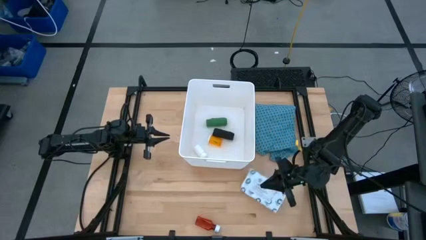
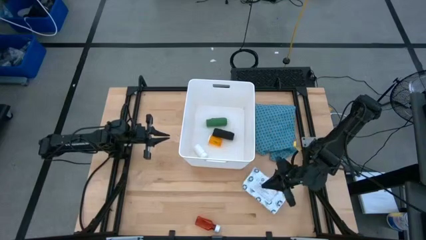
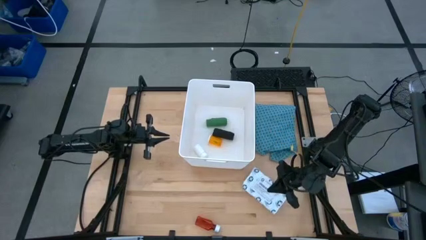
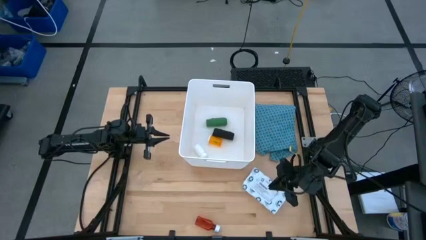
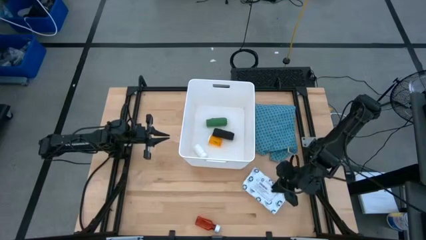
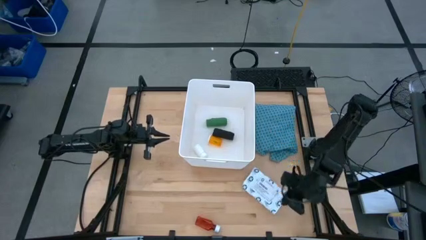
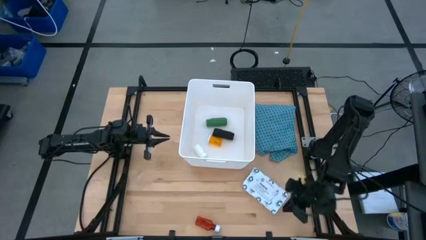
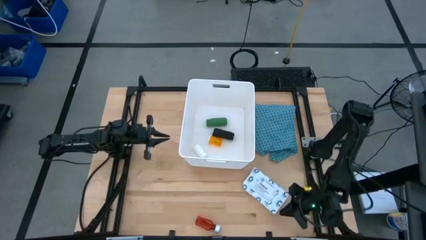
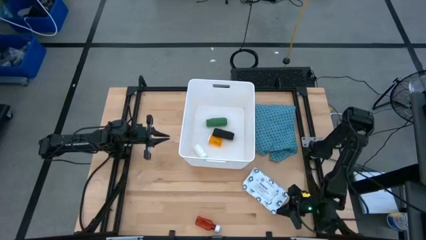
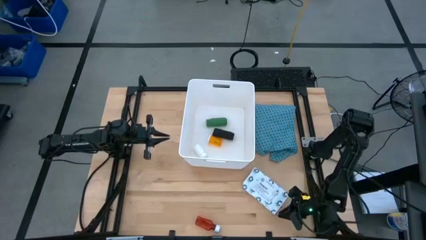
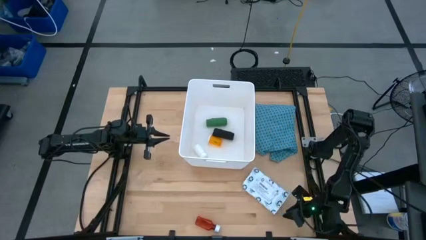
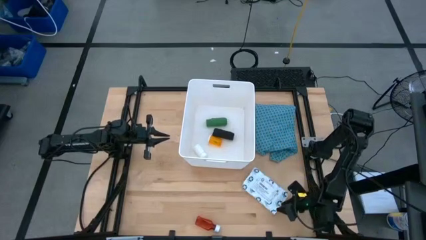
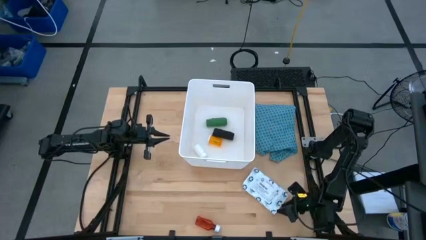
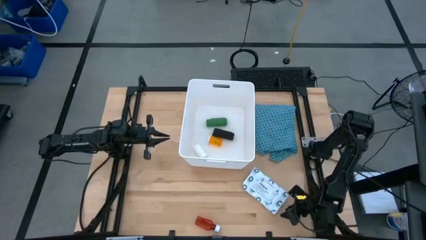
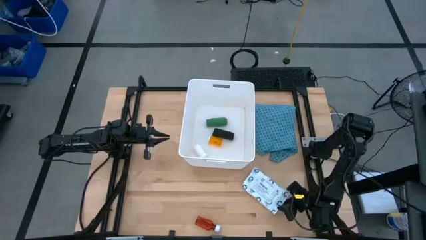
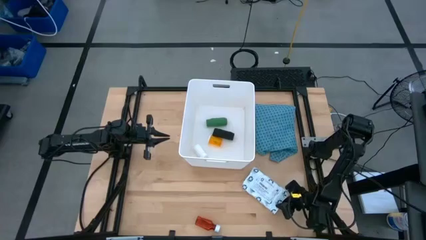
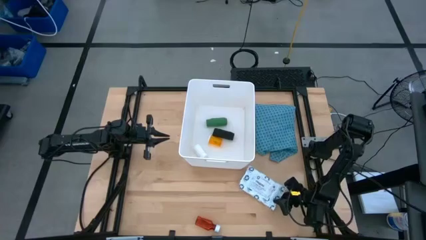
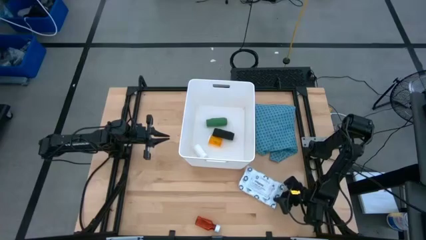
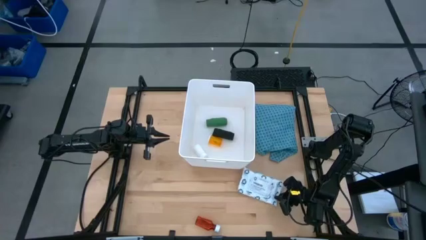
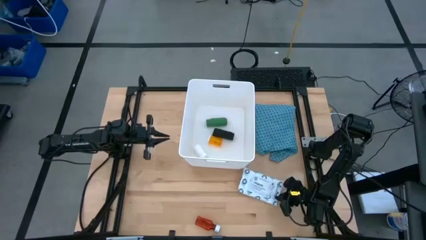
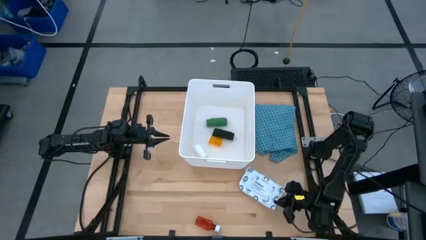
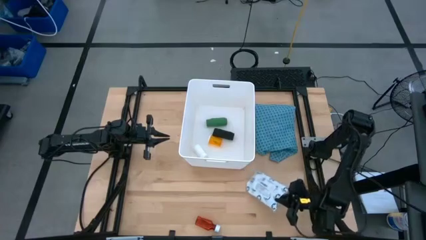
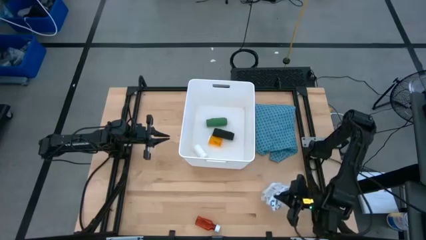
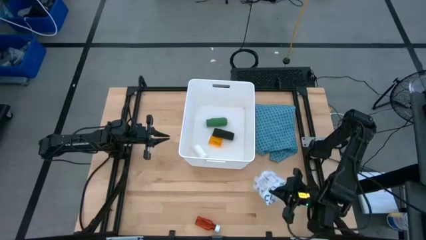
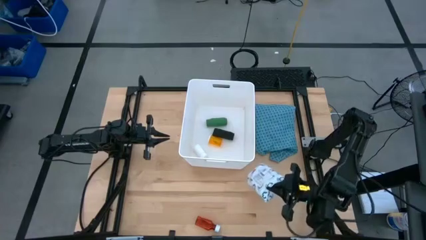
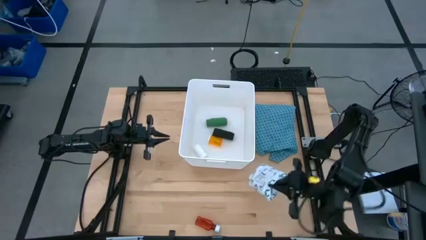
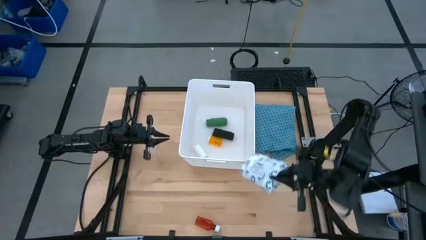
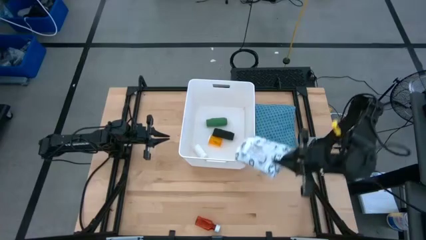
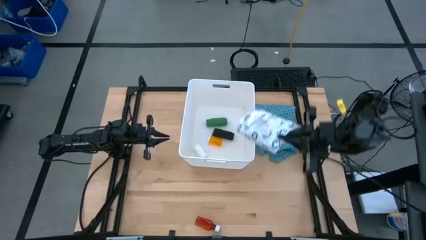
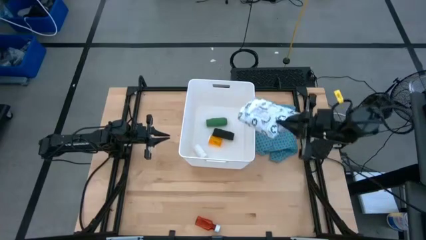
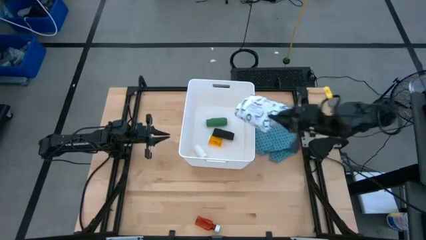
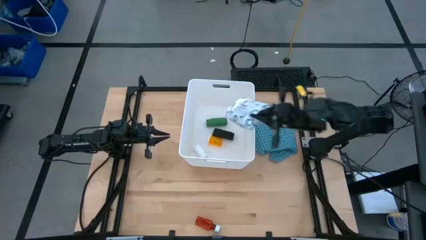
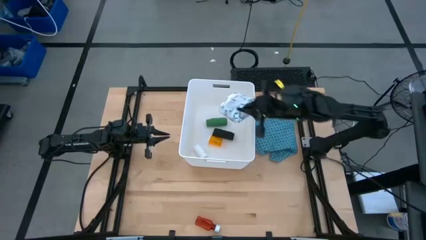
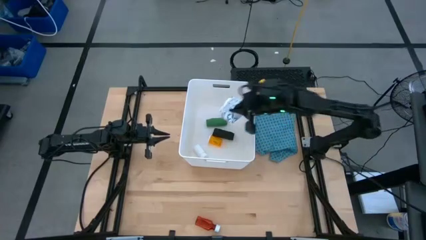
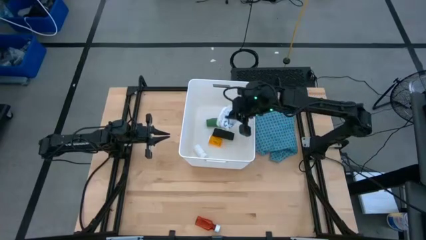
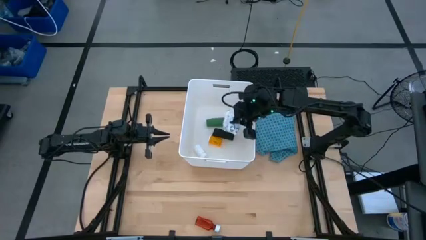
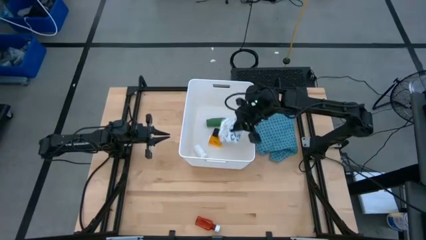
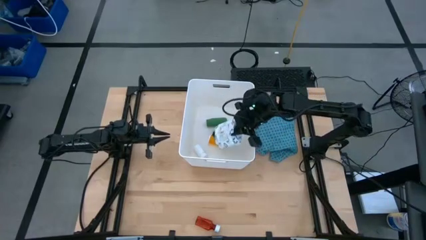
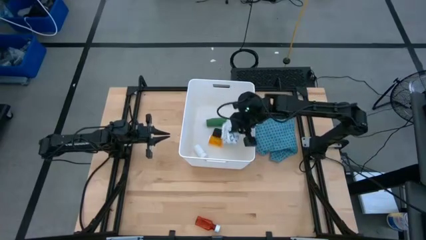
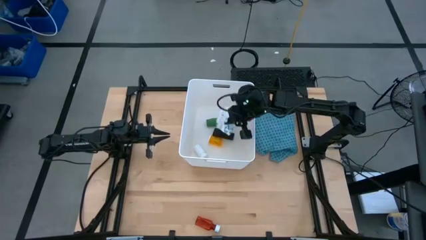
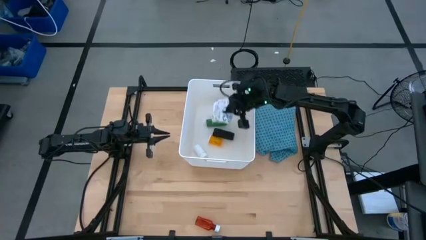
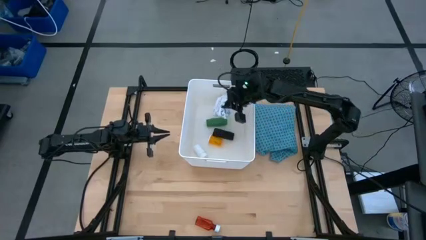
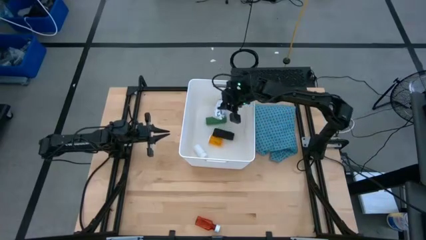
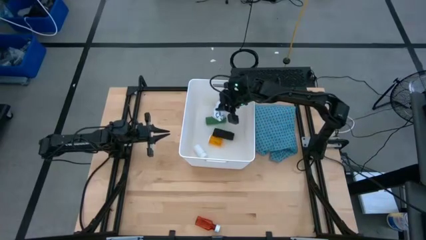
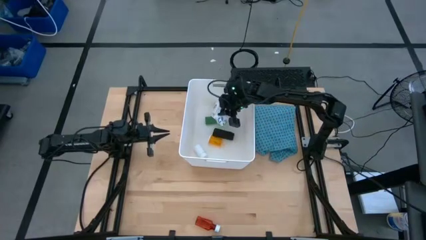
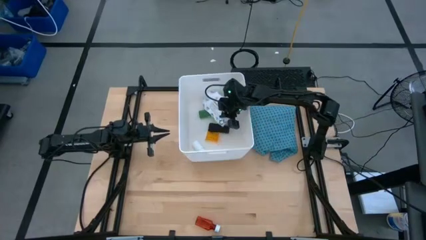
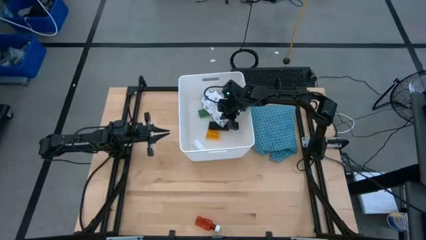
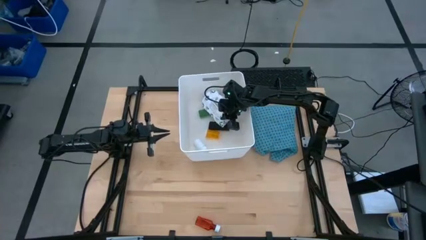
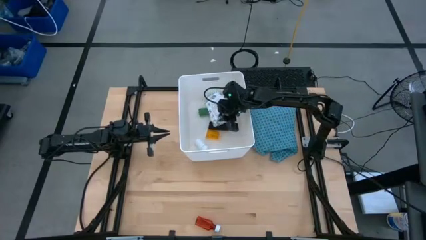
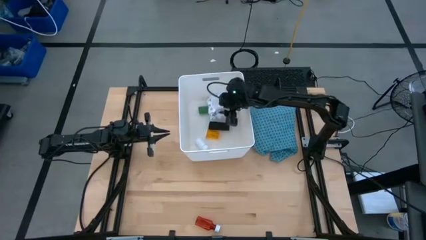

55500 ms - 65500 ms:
Task: Pick & place medical supplies in basket/bin
Put the white mailer bag into the white bin

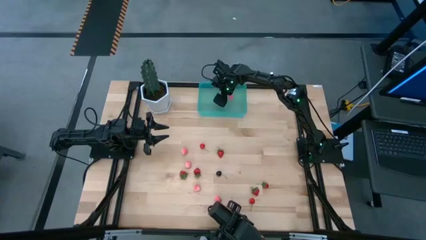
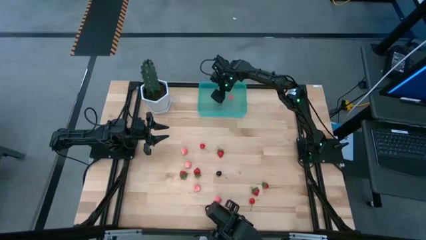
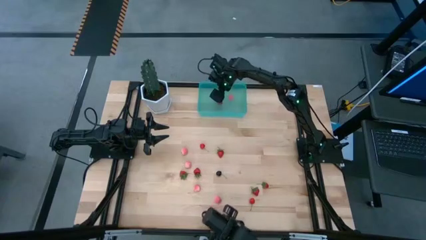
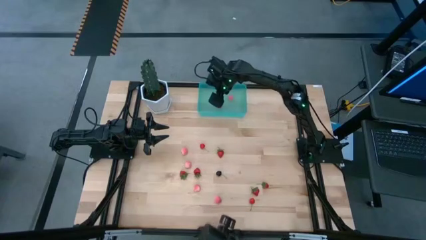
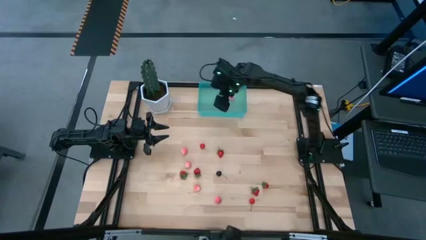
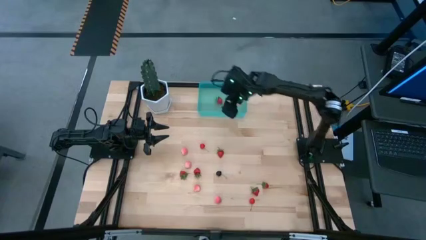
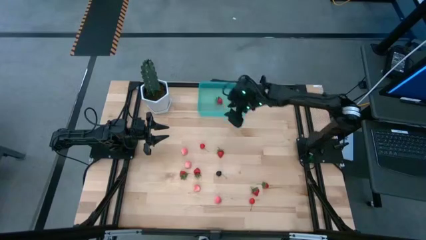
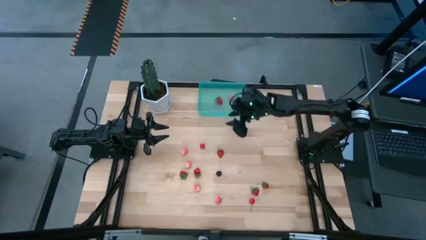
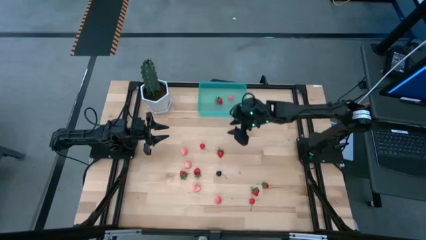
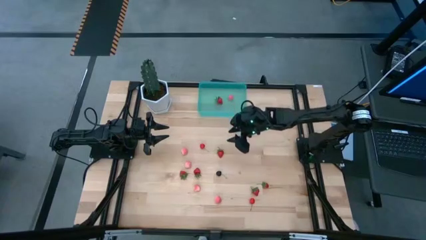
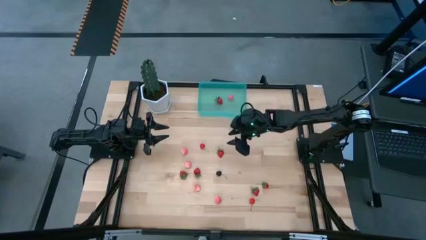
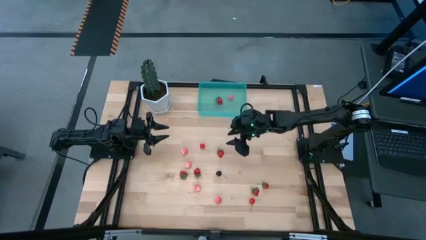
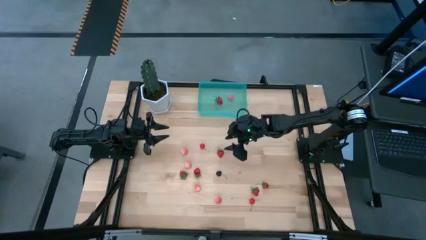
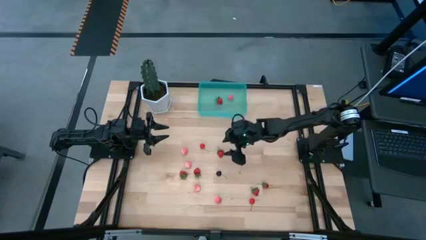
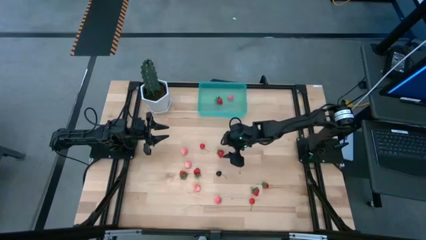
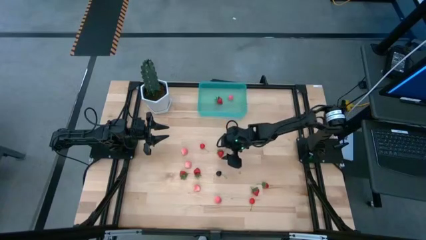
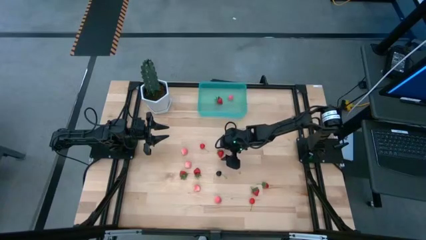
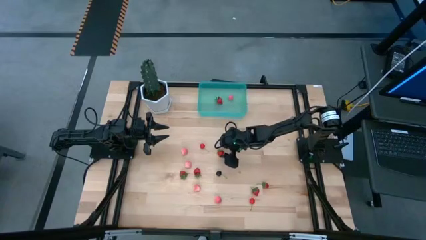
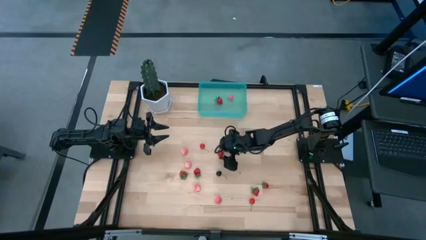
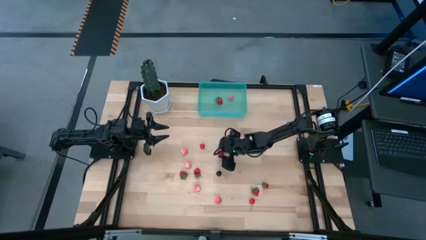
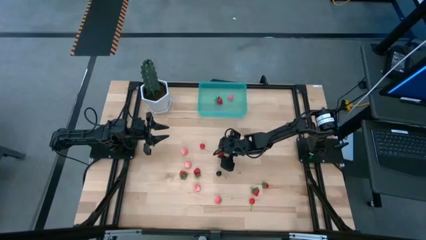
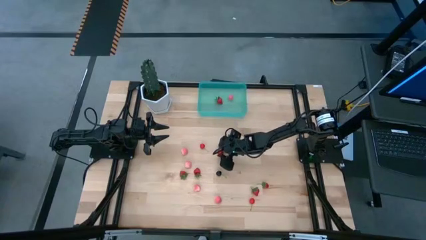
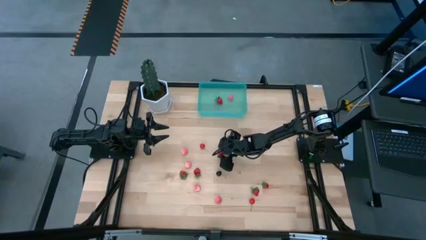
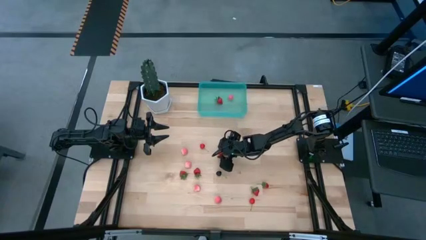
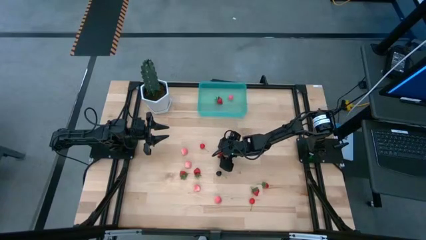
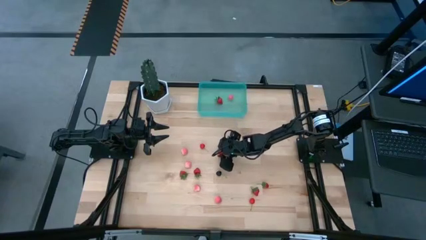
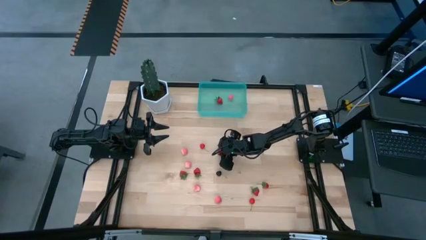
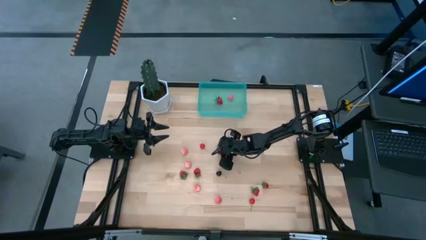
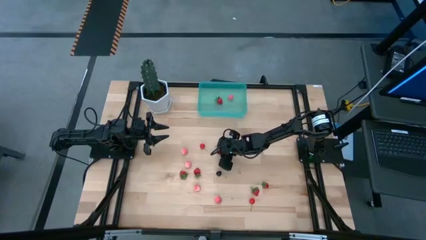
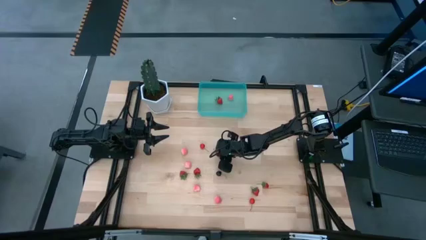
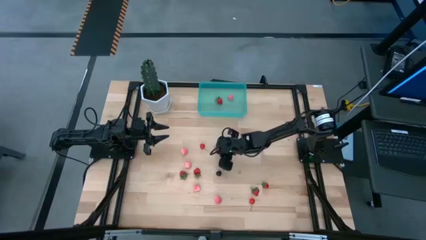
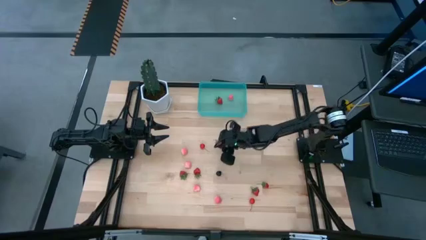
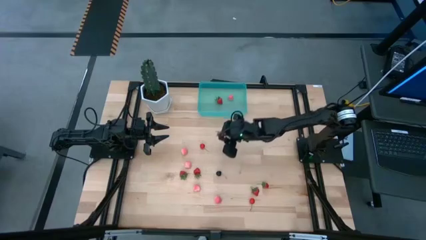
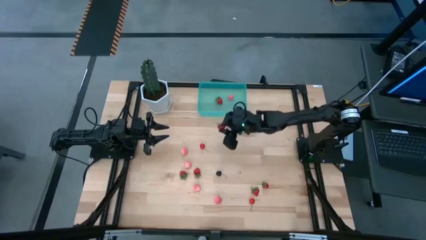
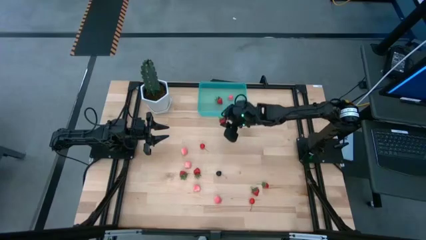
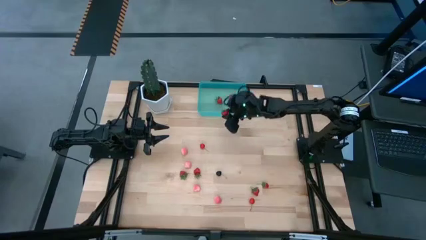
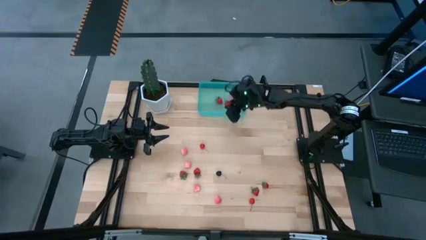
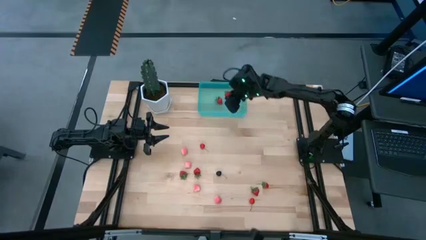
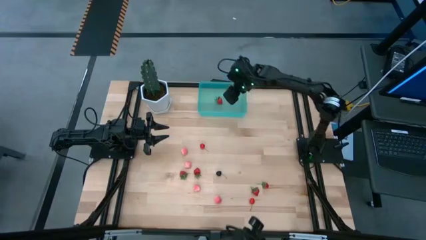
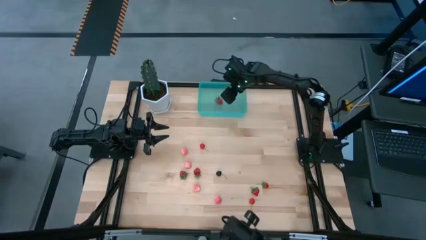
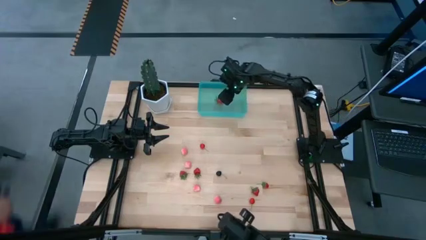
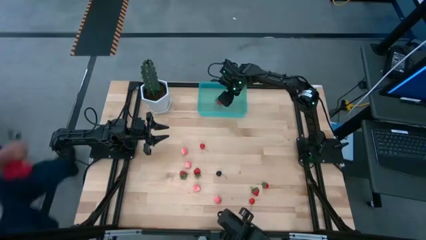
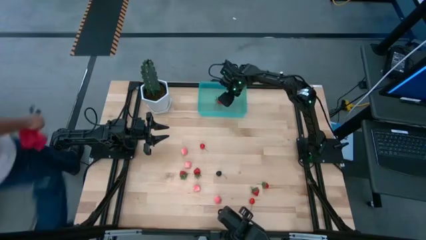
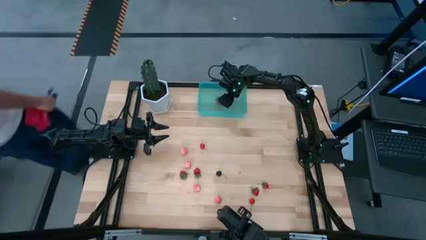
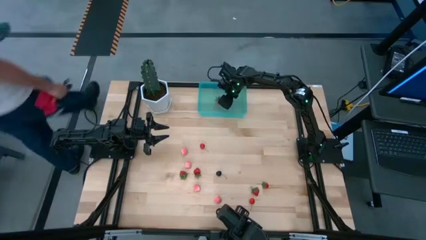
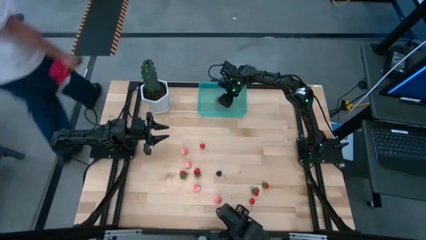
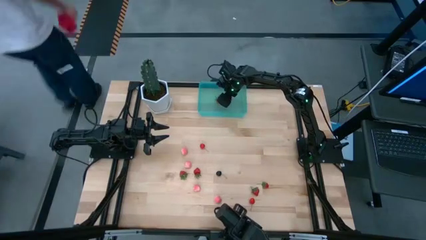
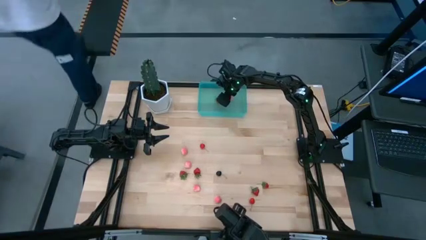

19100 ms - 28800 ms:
Task: Pick and placing Produce into tupperware
Put the strawberry into the container
